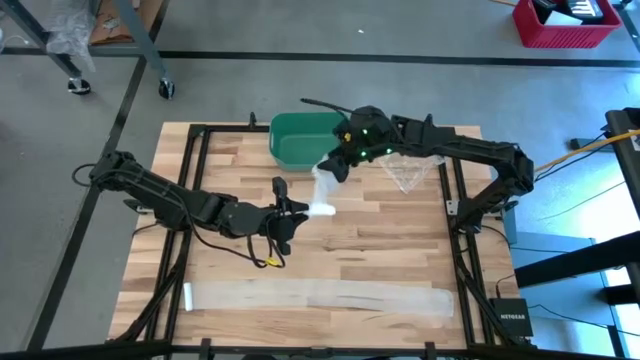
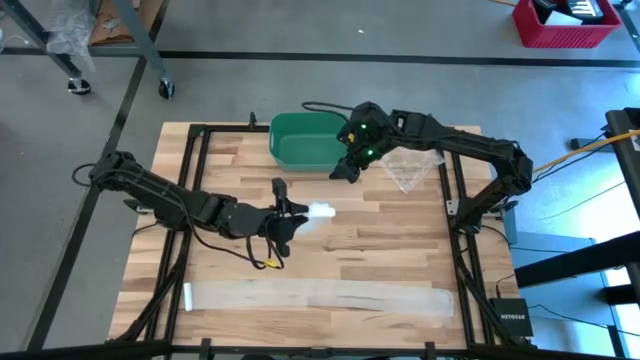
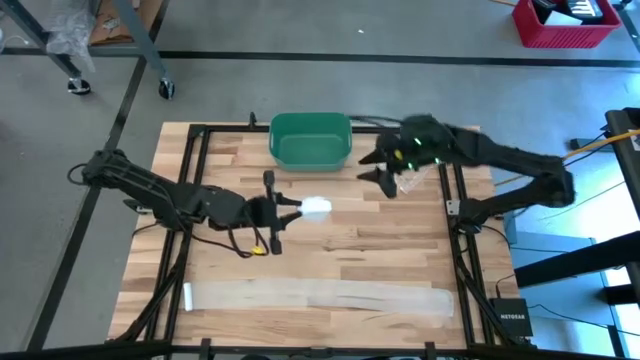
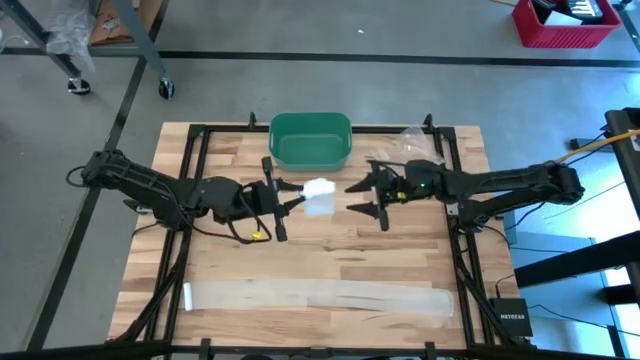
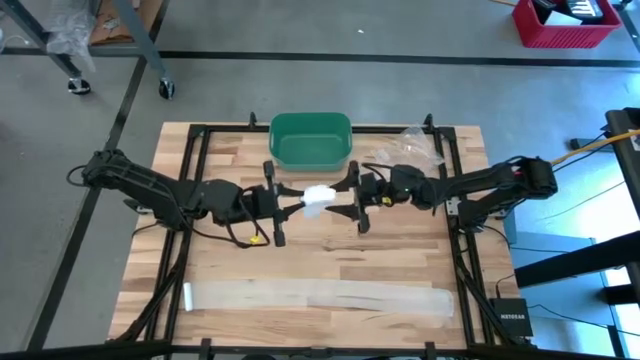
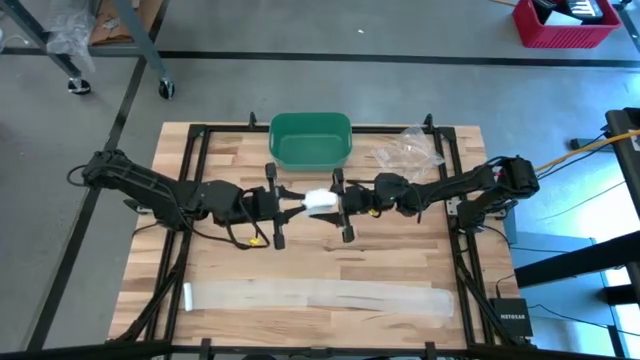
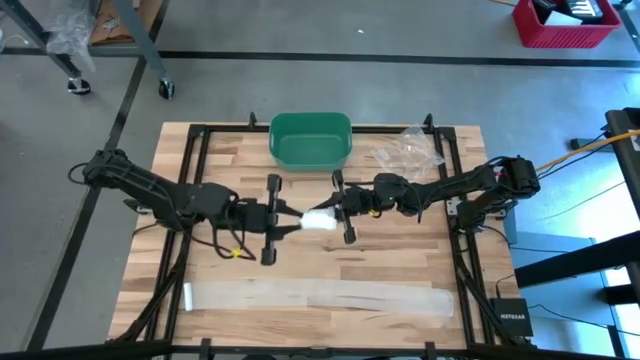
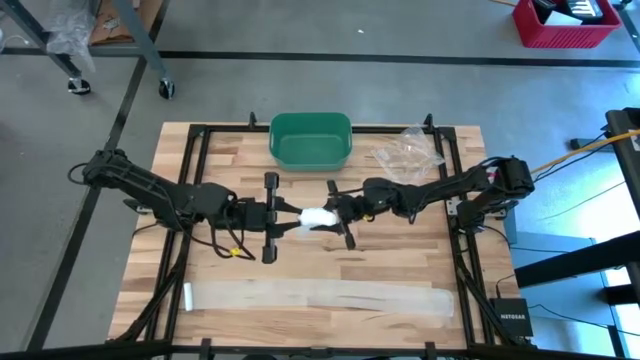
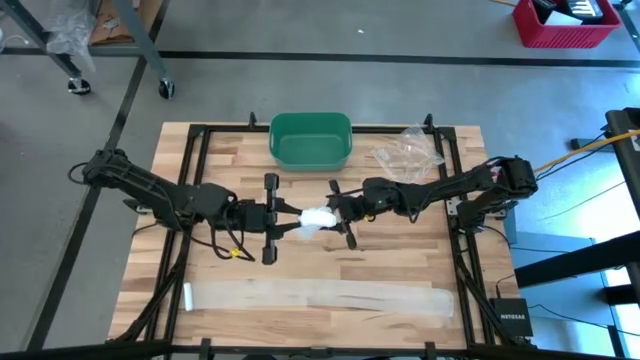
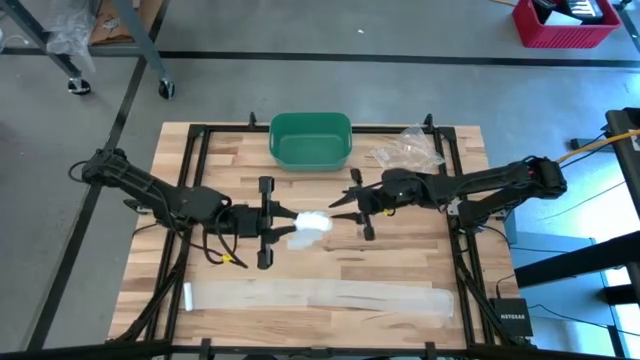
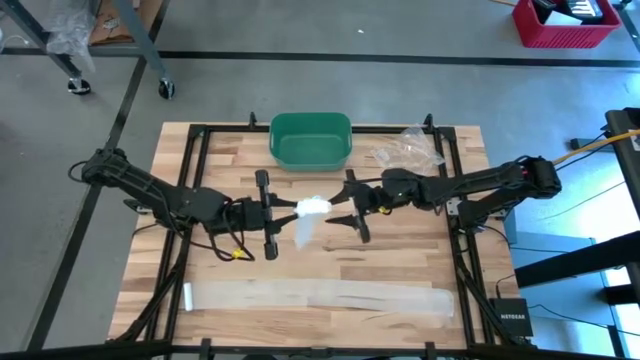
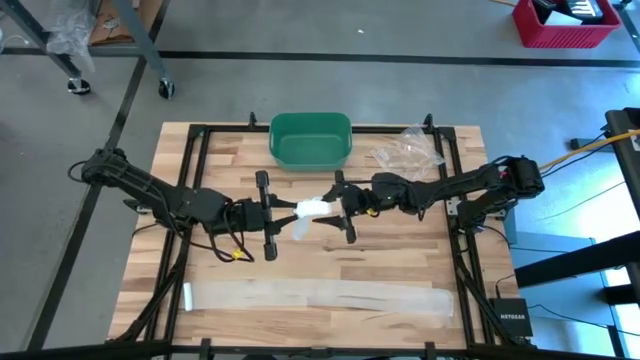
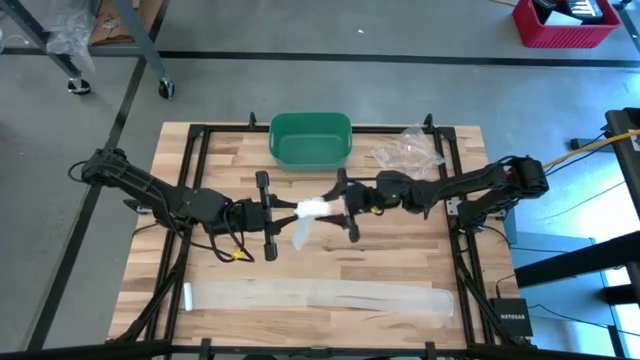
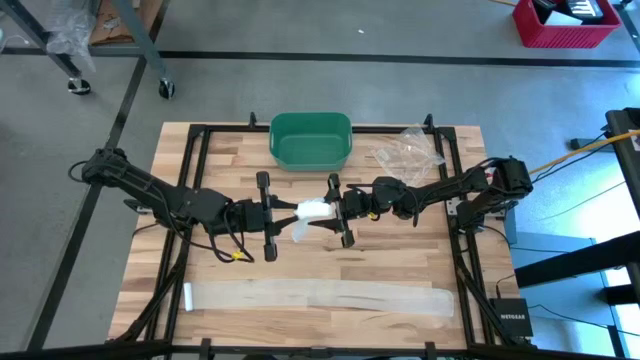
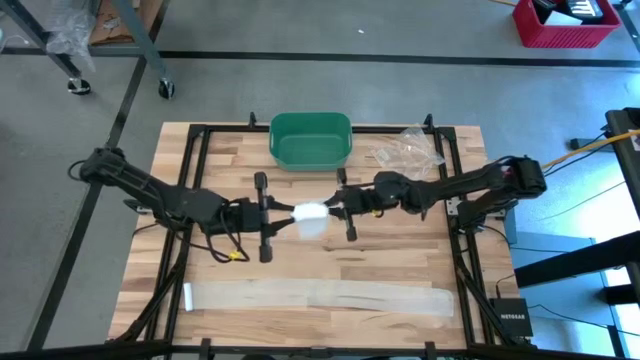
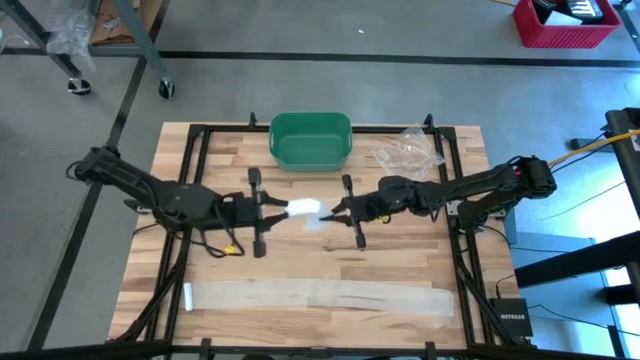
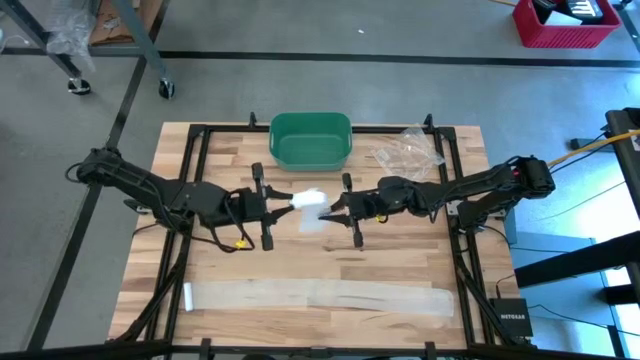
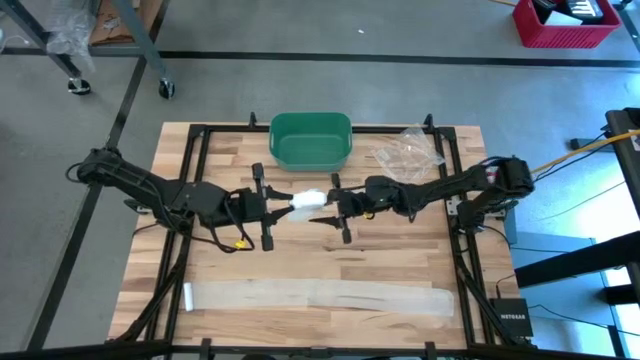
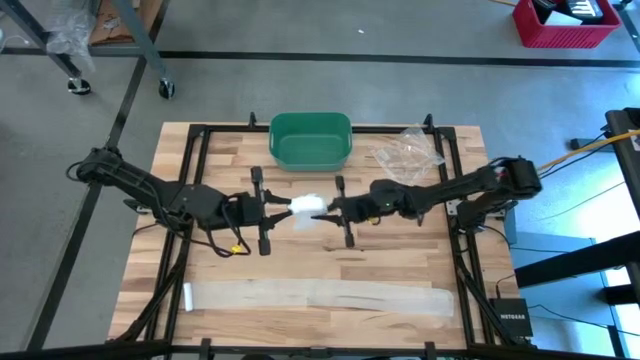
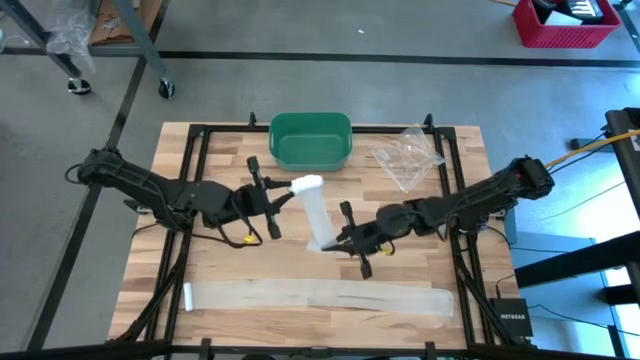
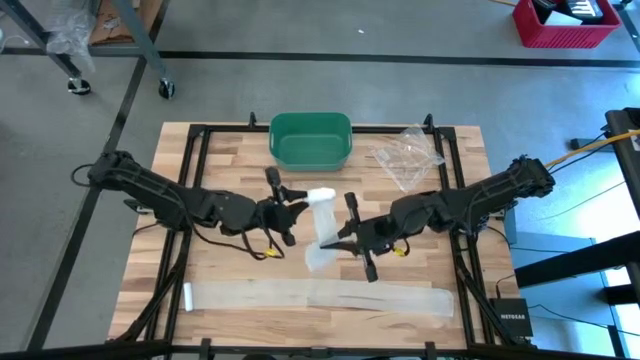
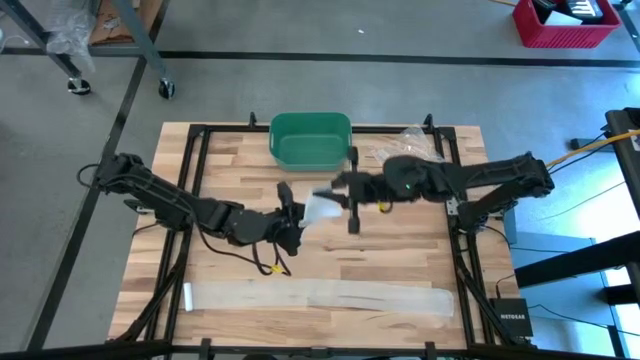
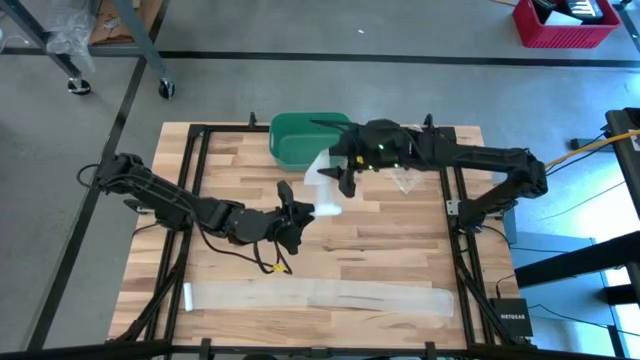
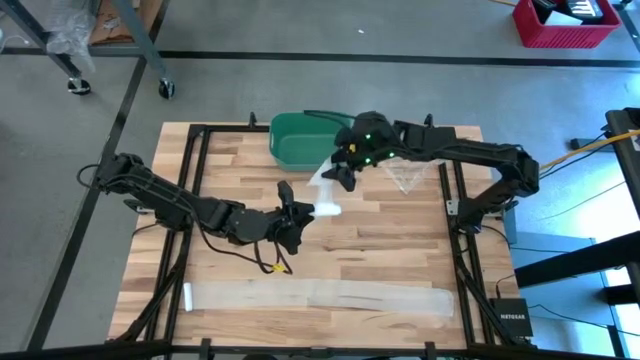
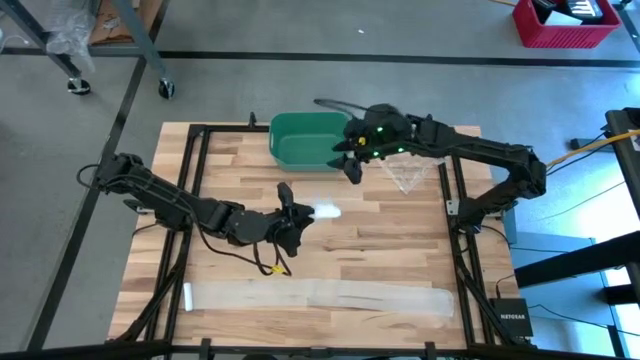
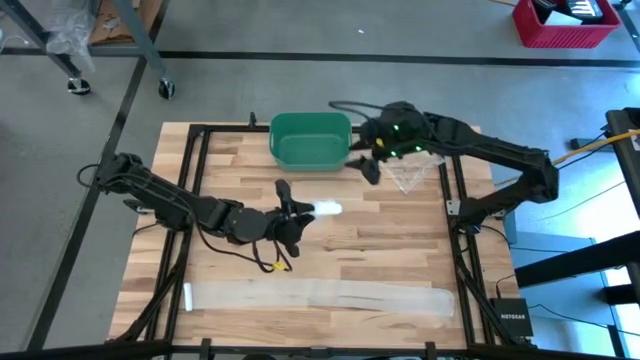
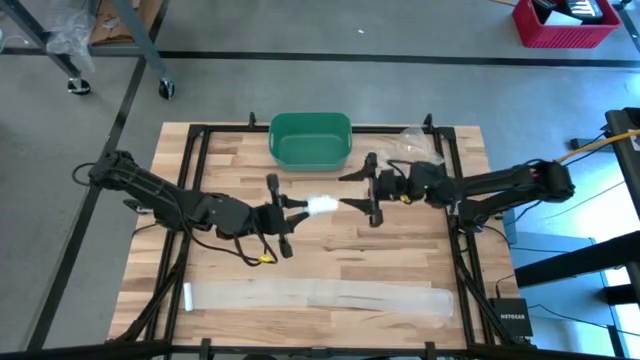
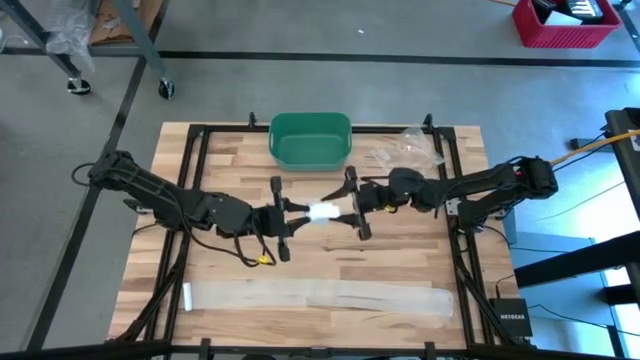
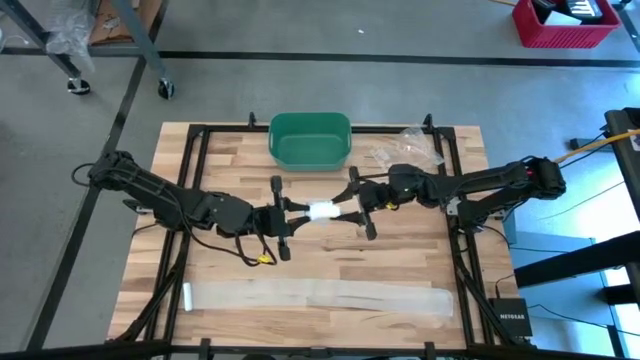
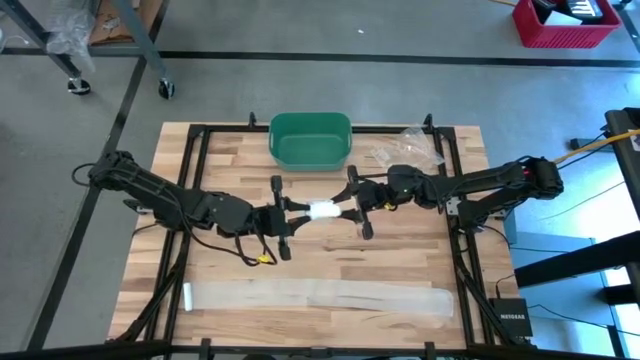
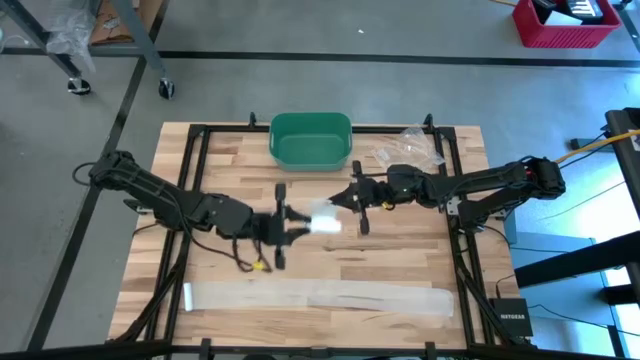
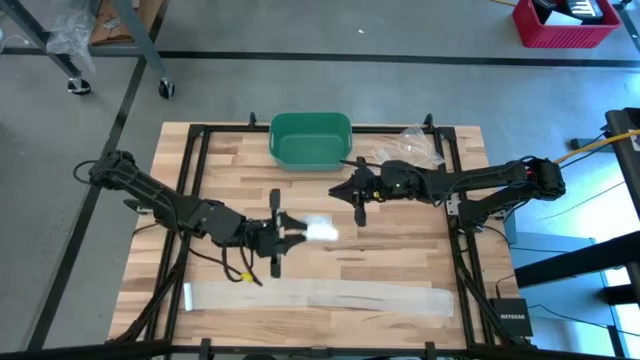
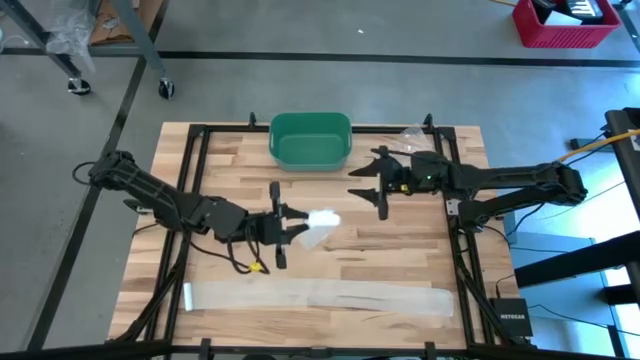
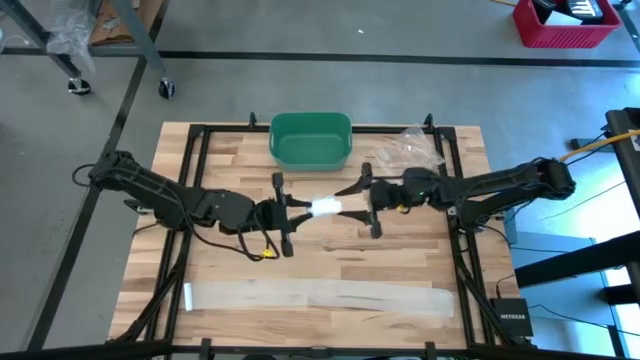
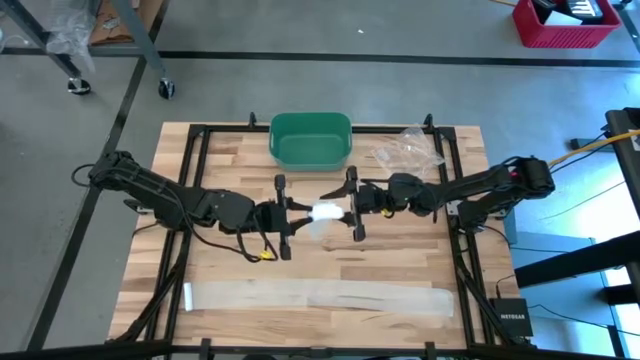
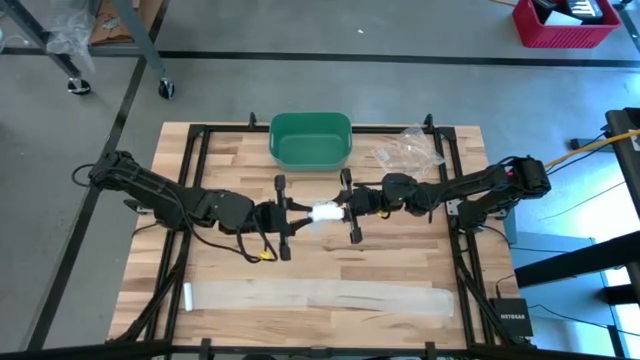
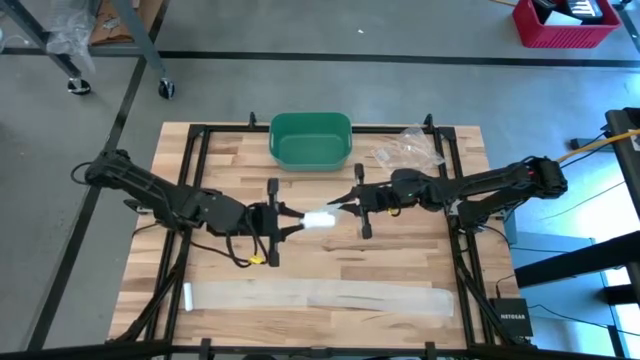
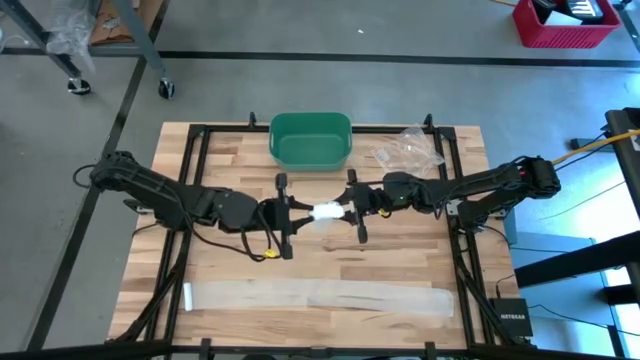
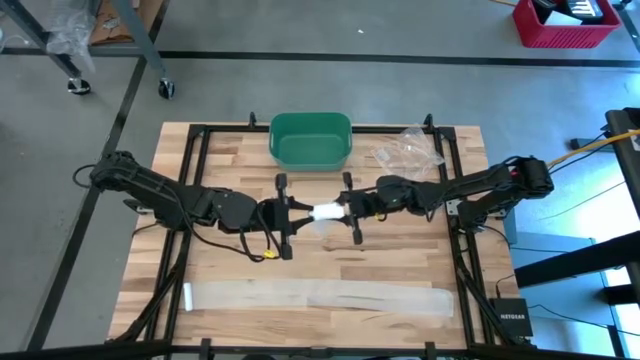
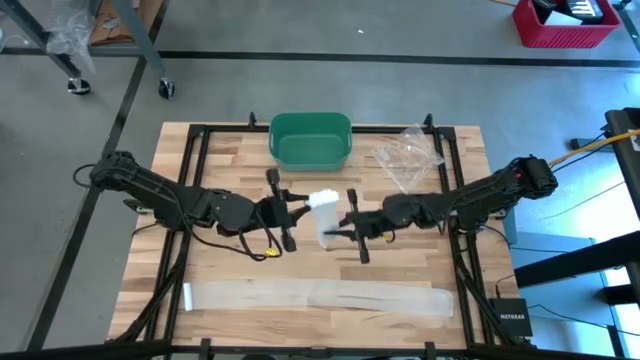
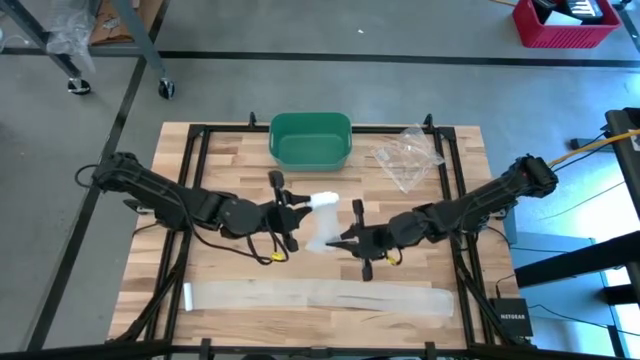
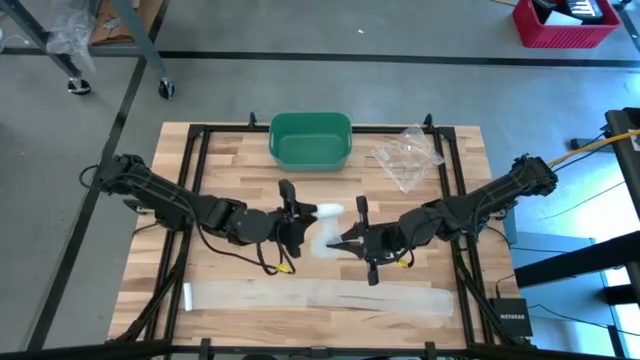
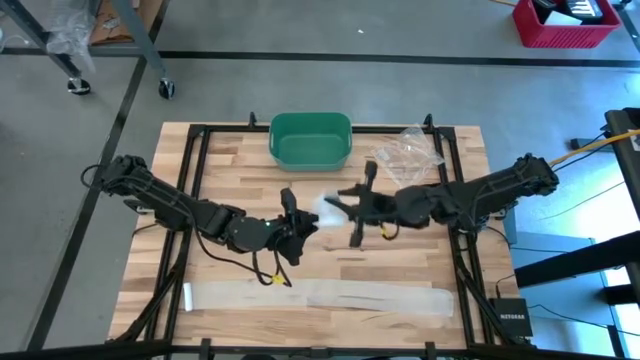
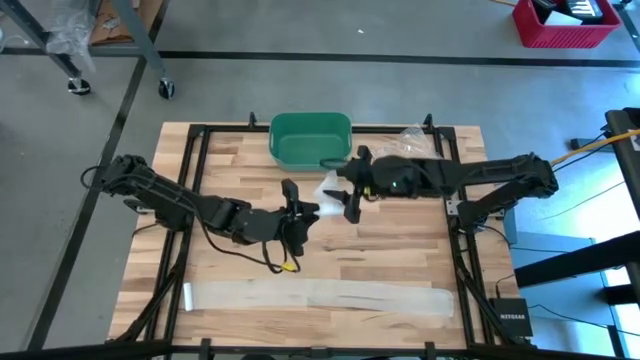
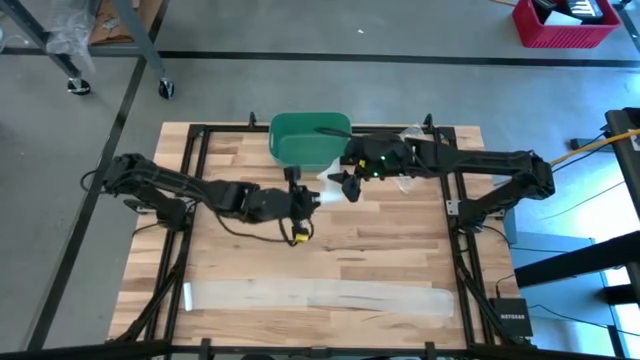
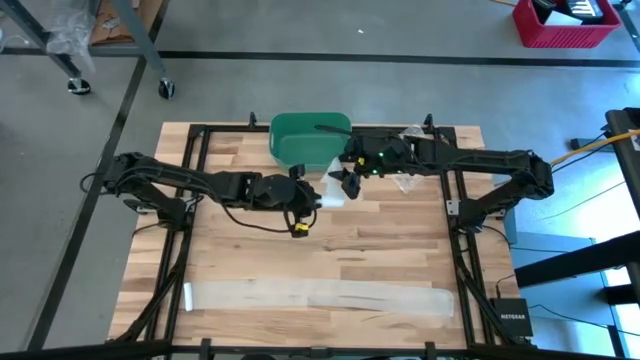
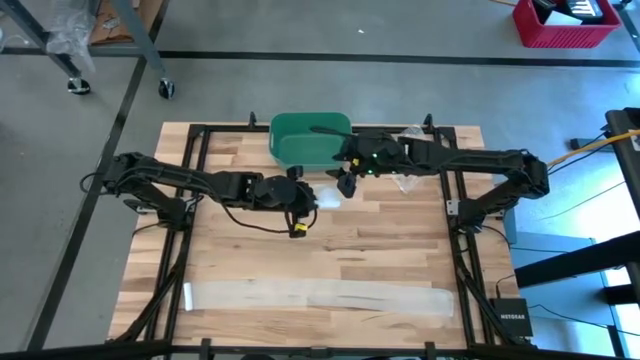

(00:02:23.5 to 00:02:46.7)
Task: Roll bandage
Roll the top white bandage
